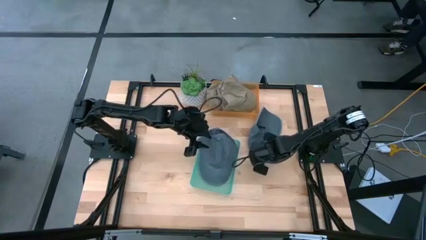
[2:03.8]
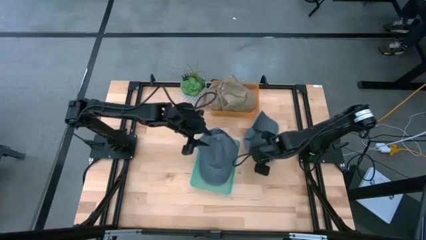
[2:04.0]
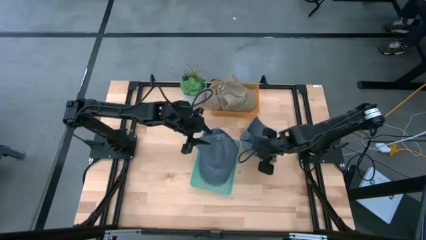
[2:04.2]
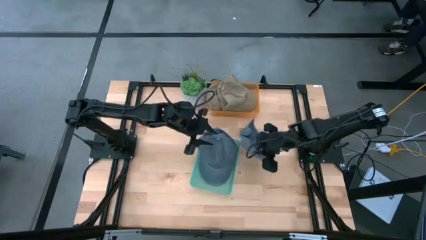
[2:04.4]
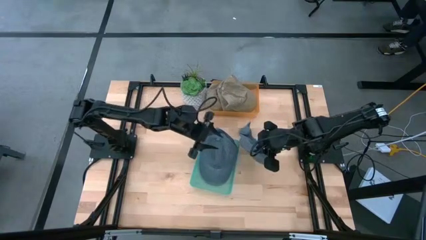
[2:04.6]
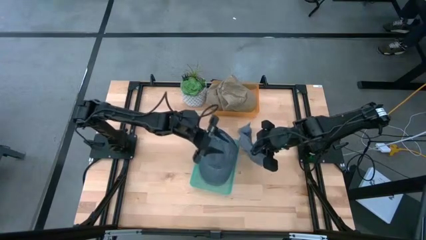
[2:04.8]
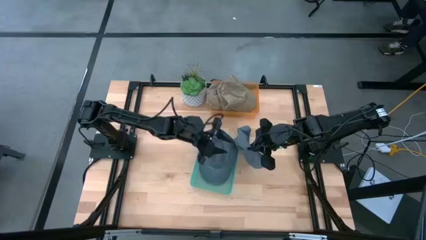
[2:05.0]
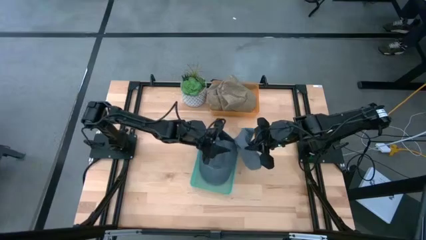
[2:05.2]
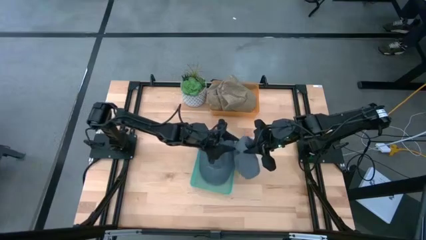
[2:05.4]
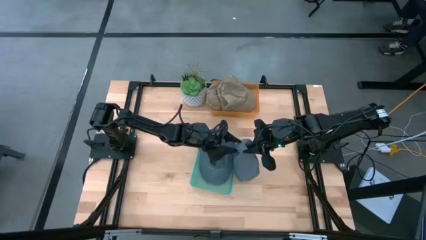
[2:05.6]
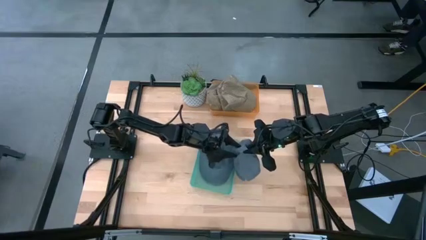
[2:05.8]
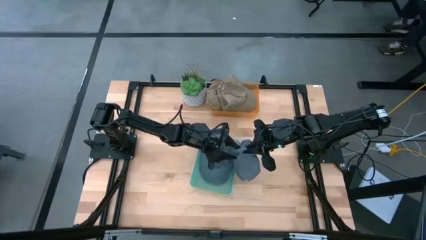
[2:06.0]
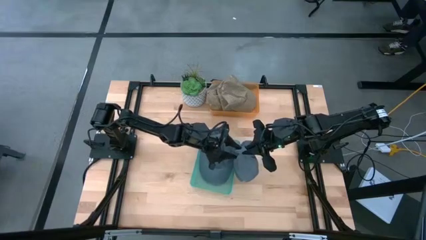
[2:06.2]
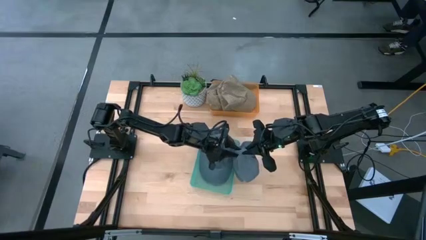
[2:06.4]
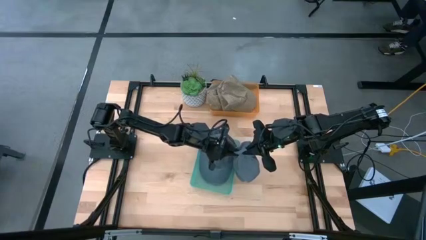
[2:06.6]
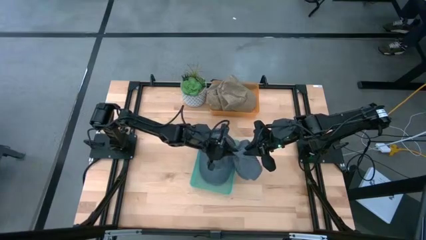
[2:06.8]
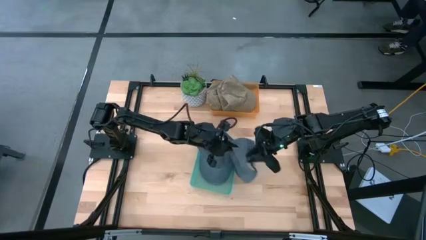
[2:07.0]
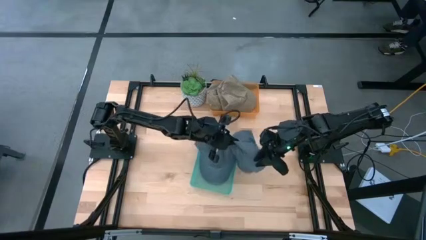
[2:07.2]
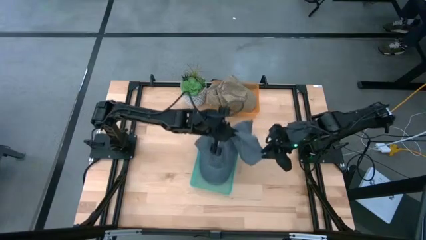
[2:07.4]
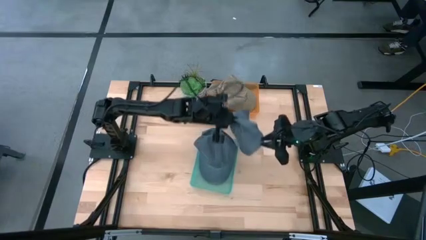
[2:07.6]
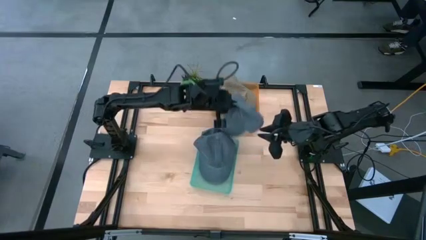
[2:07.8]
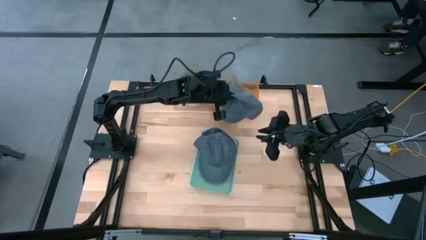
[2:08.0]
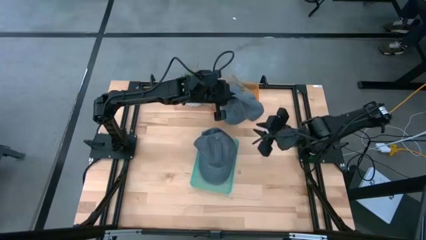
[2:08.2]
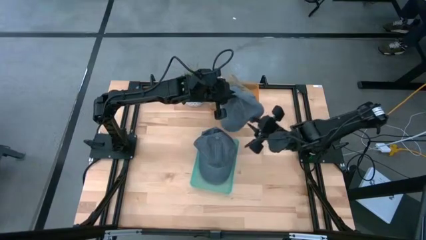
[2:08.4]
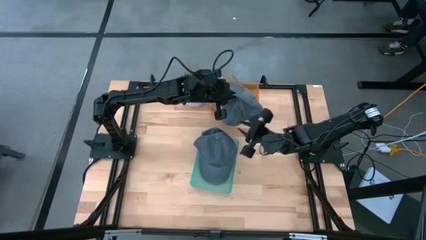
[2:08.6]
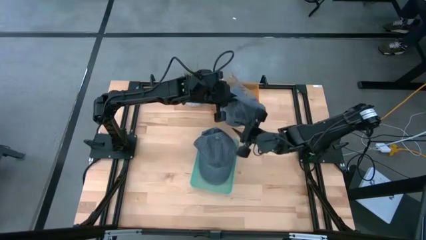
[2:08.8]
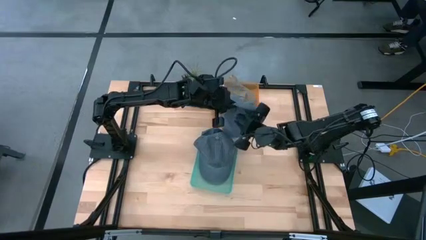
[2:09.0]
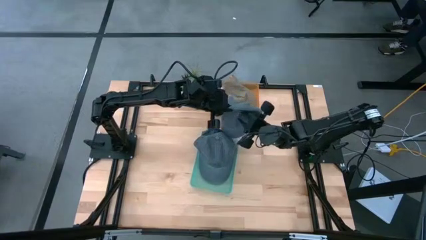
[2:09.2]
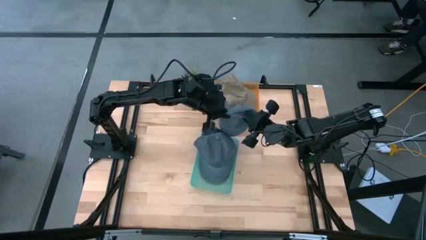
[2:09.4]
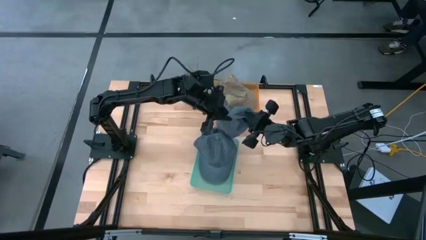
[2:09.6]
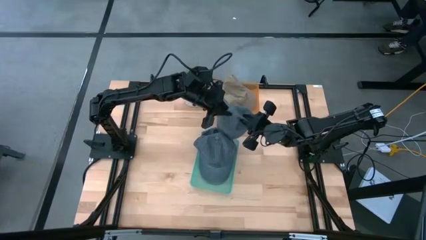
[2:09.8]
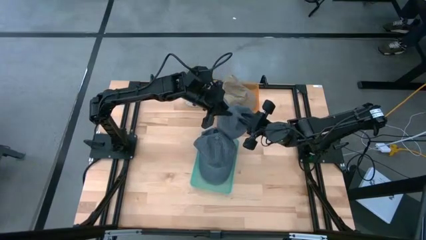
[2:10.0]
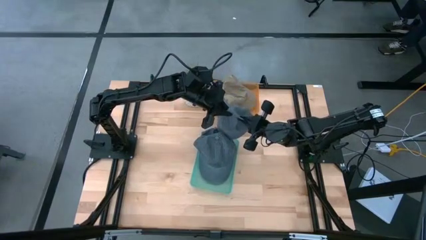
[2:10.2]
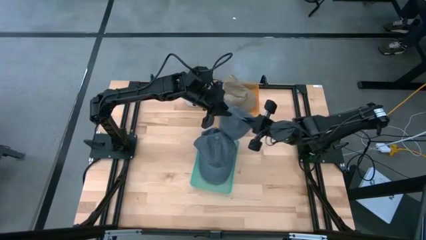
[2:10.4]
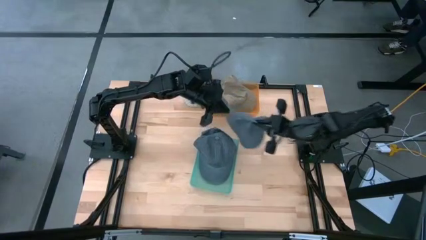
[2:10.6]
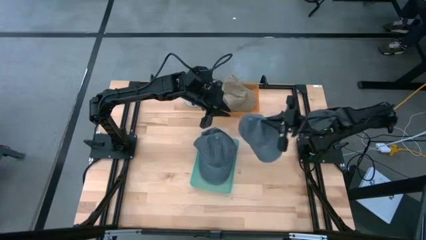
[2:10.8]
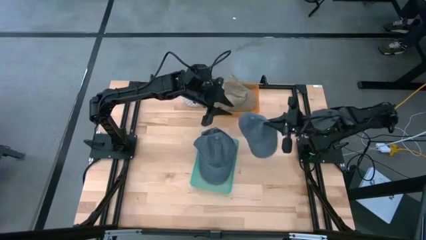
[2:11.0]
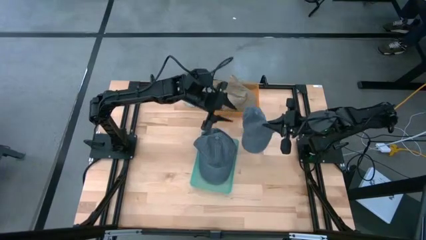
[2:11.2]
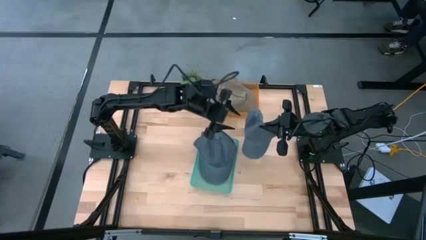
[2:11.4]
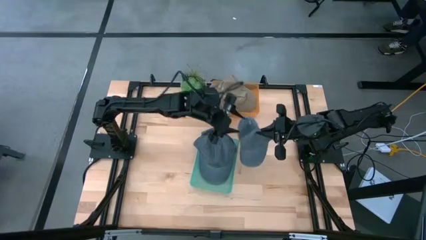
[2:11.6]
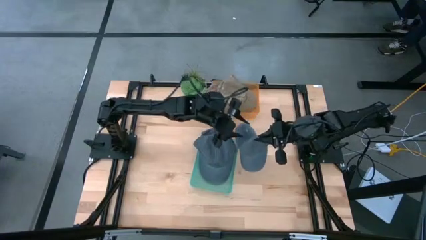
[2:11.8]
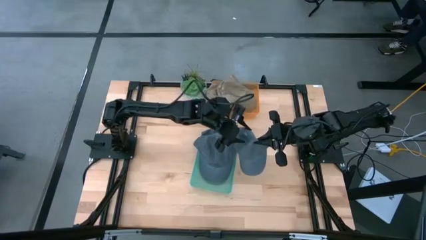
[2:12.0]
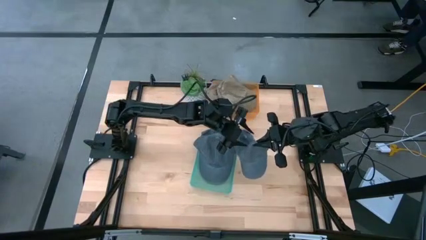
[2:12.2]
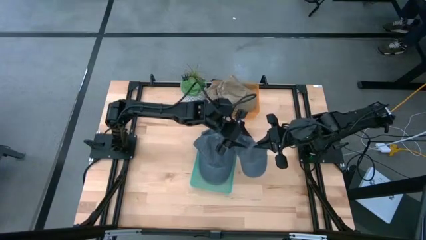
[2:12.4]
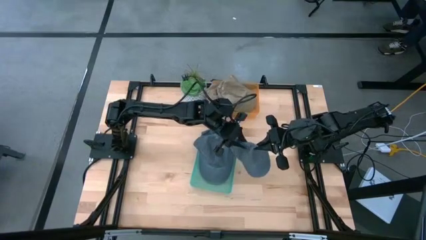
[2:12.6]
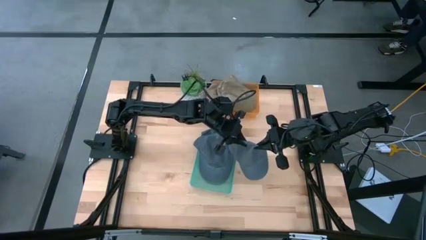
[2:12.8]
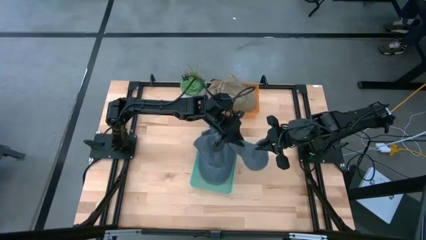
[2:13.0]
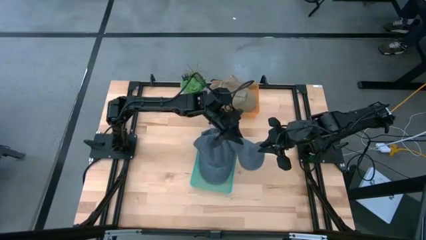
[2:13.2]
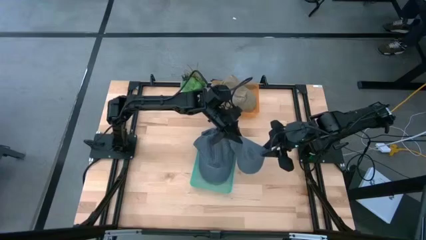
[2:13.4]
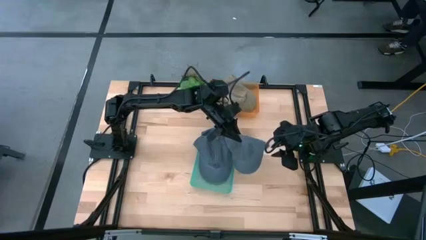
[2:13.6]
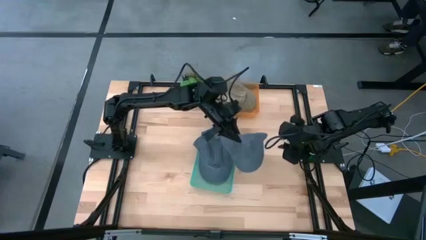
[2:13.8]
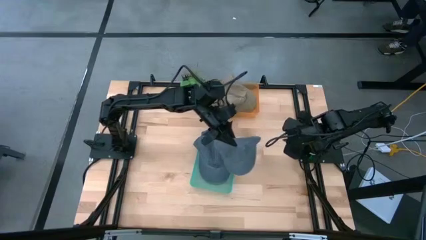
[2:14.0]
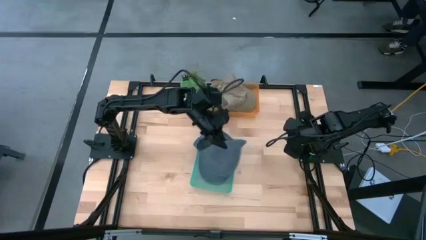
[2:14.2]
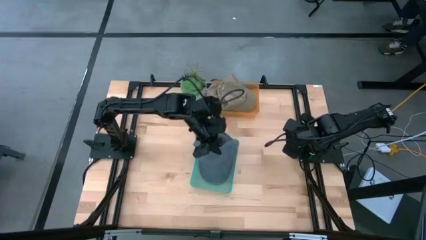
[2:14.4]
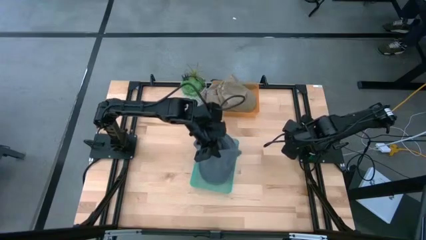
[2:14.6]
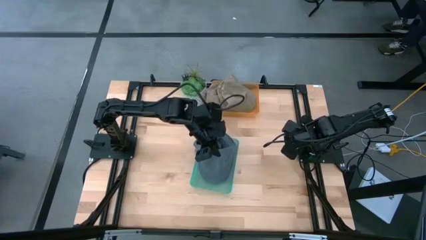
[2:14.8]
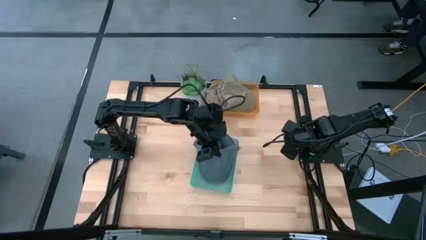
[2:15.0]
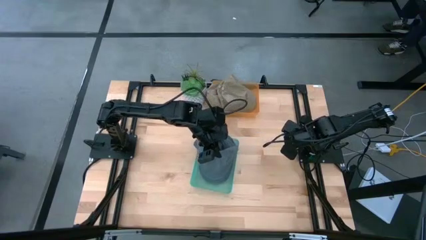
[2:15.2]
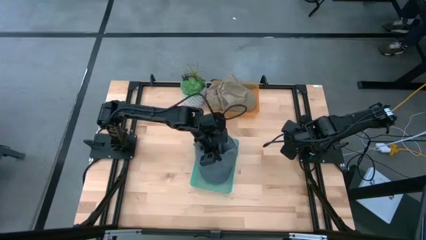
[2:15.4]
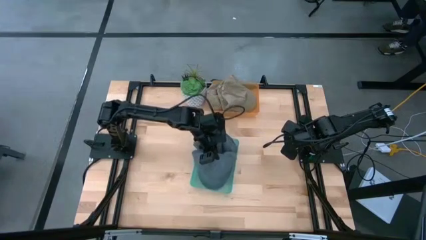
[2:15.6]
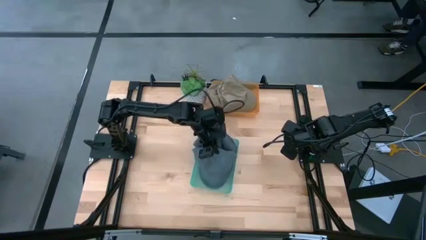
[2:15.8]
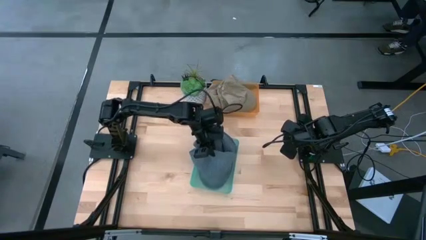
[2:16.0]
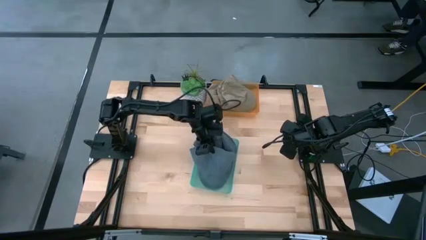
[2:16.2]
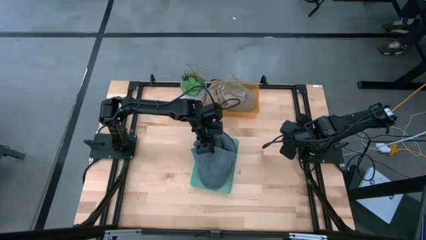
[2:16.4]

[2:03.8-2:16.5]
Task: Pick & Place hat
Put the blue cap into the green bin
